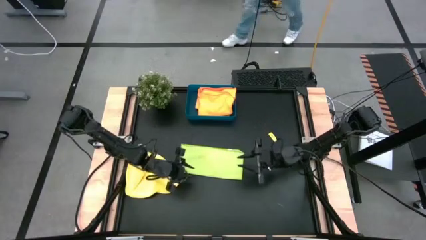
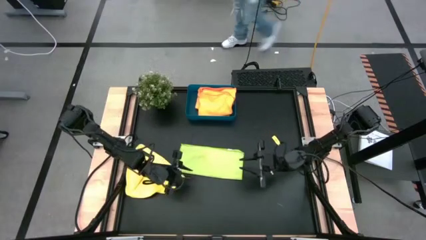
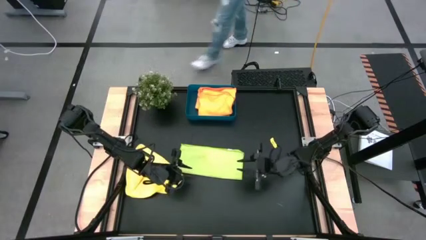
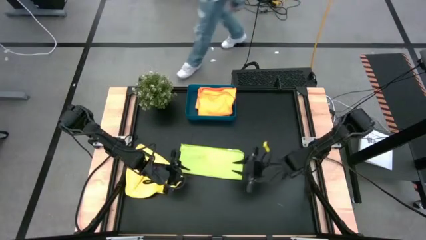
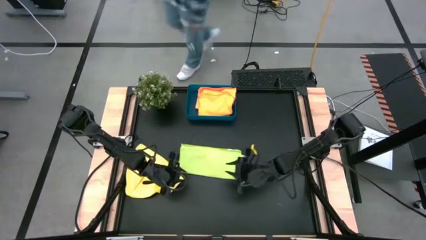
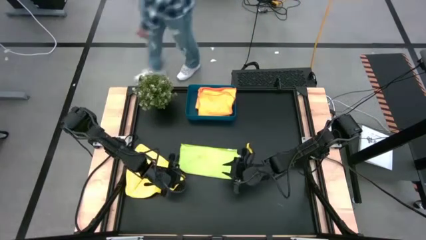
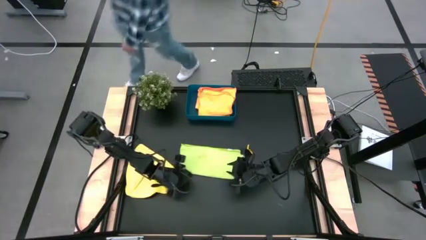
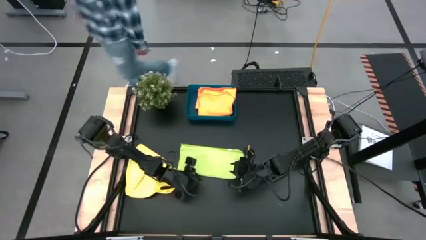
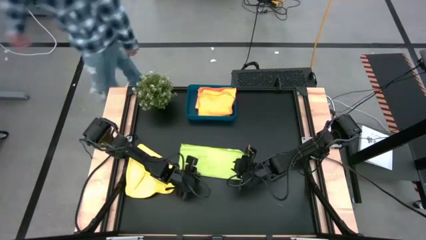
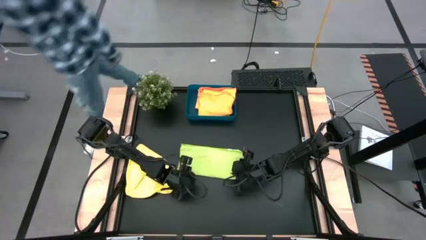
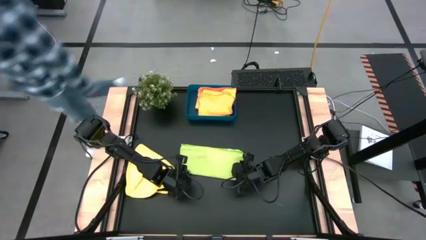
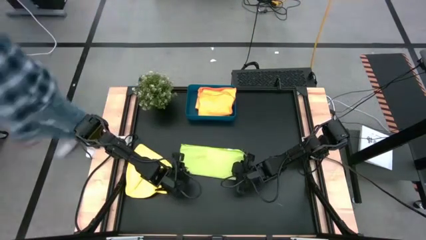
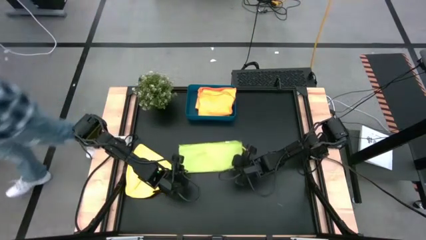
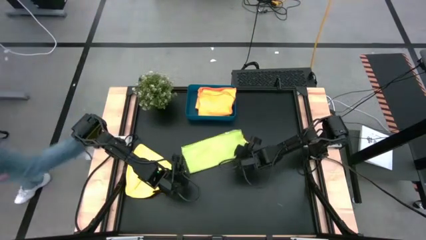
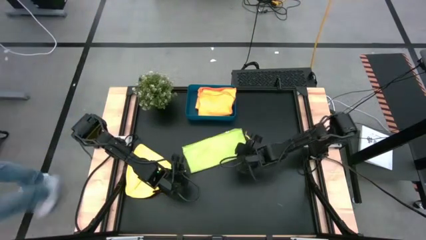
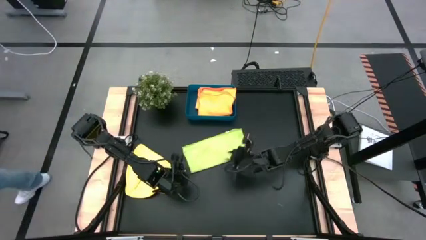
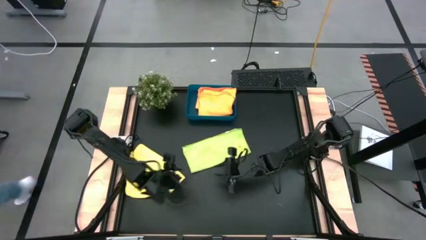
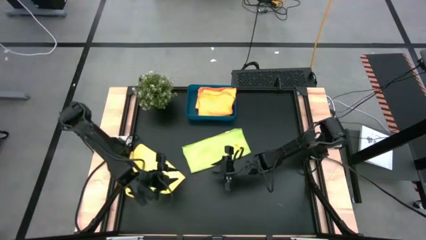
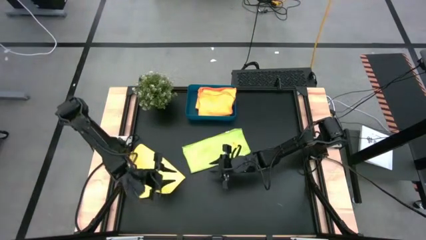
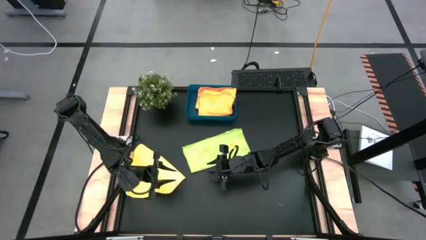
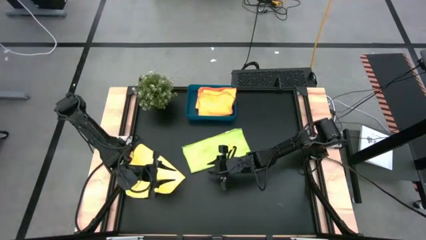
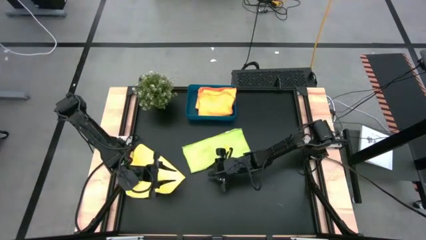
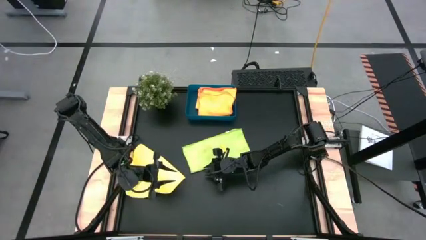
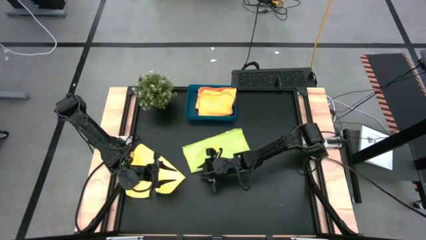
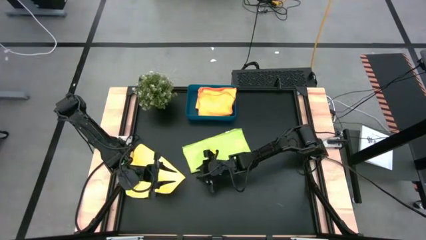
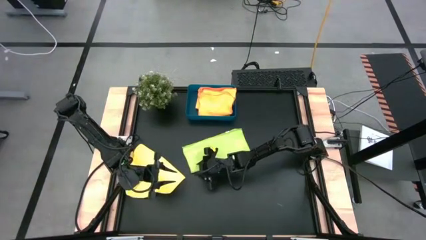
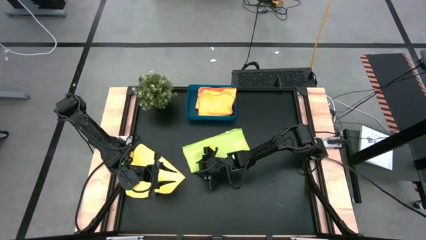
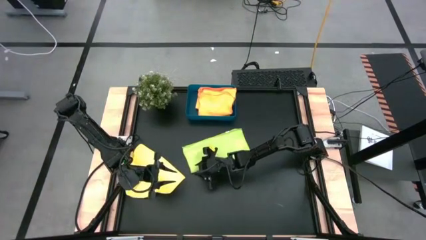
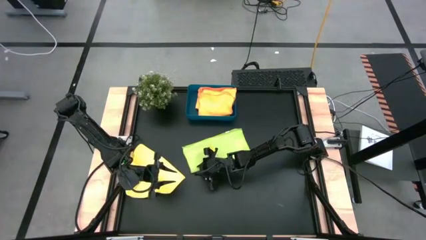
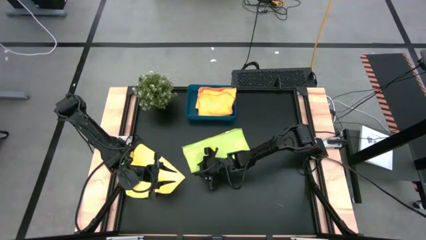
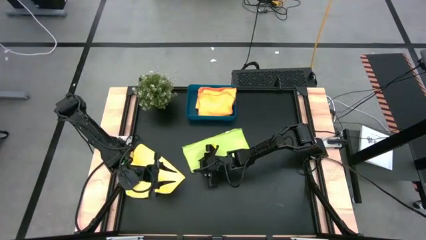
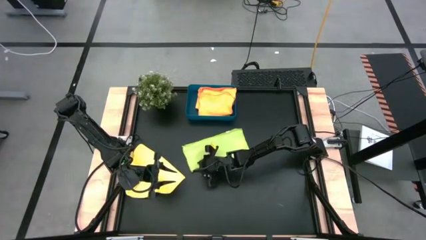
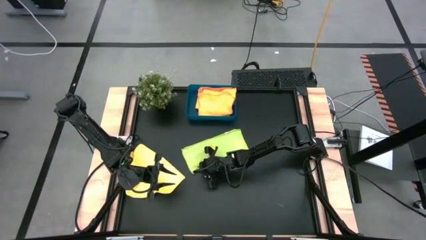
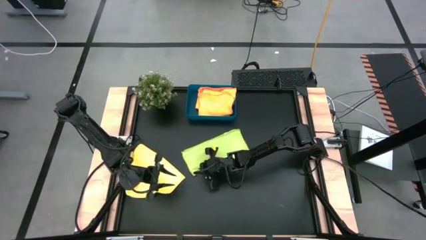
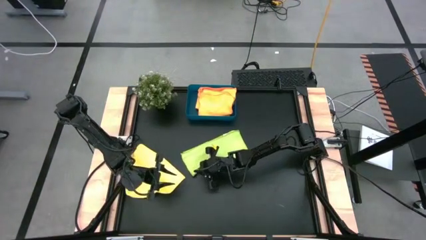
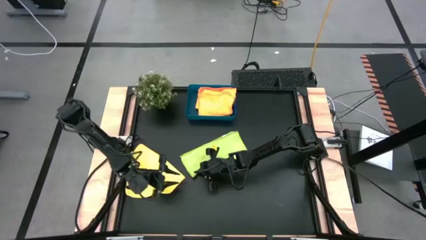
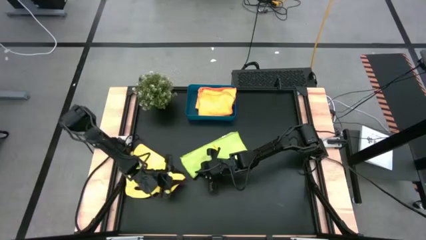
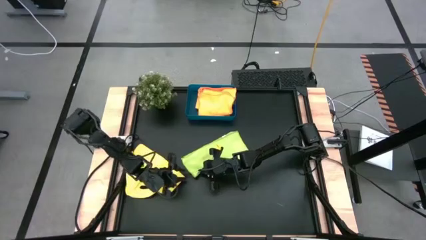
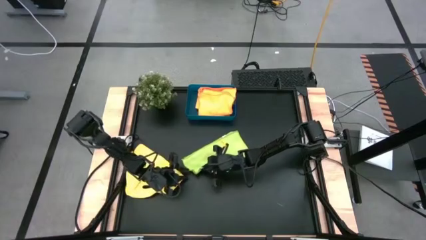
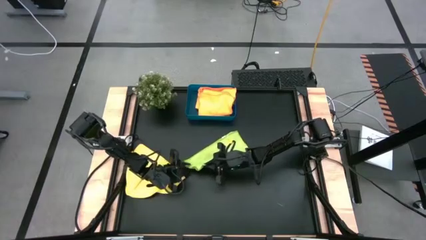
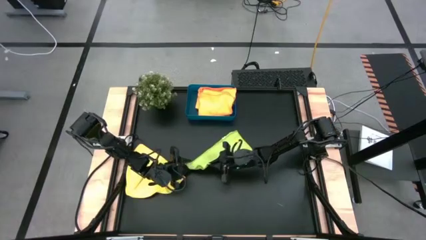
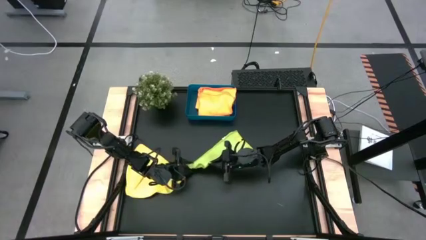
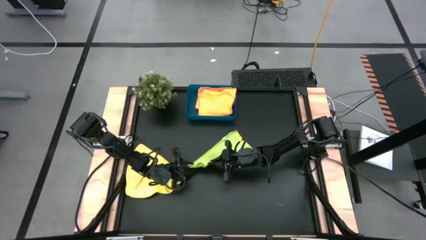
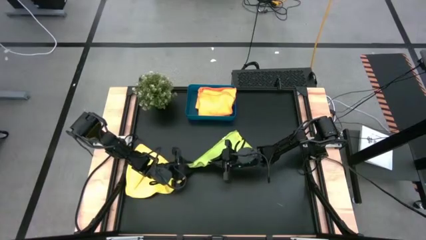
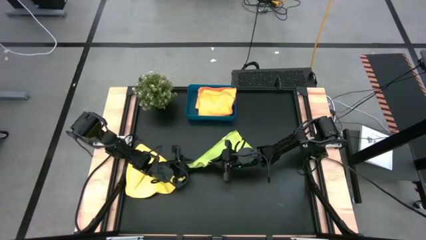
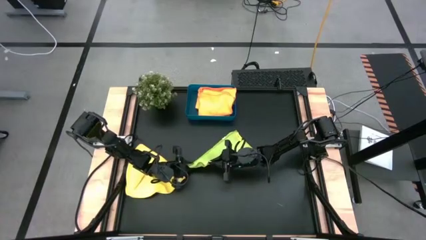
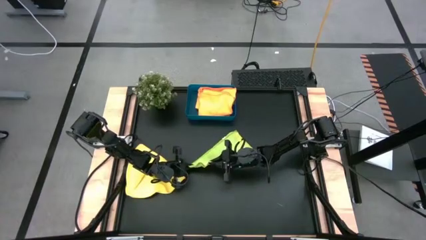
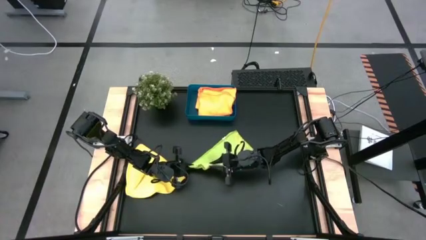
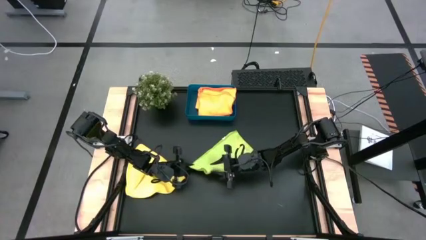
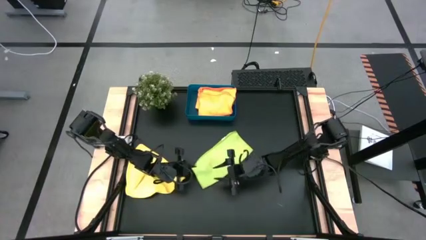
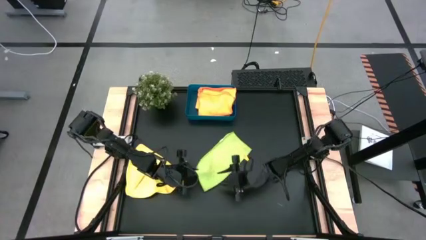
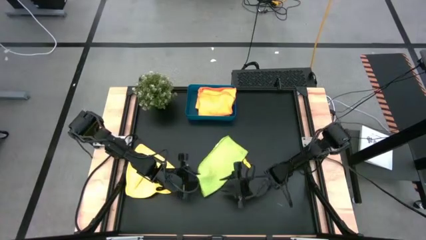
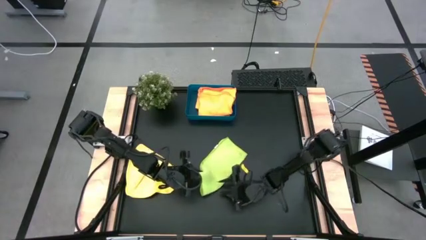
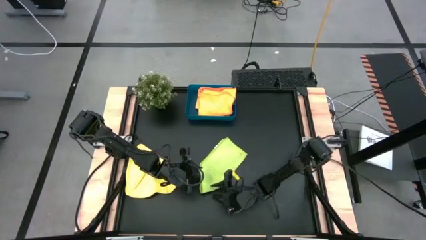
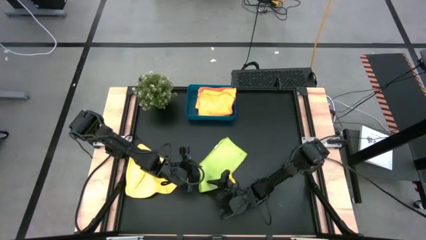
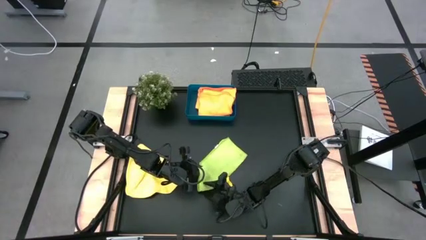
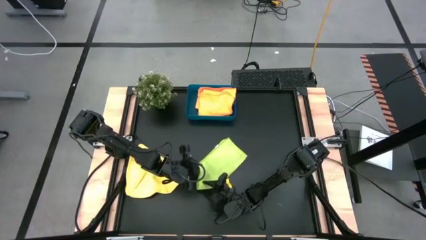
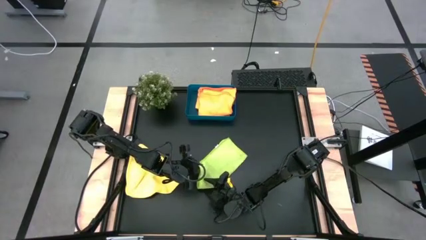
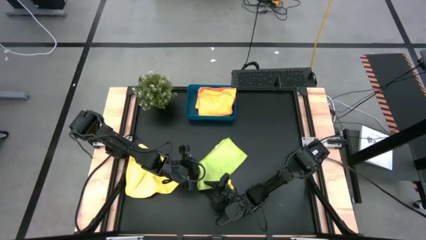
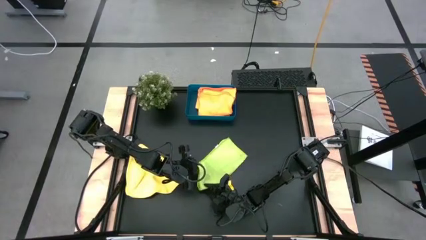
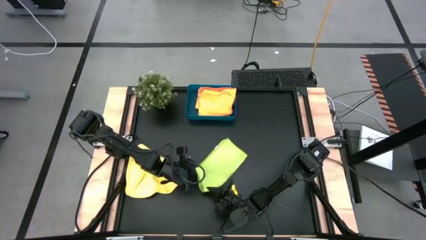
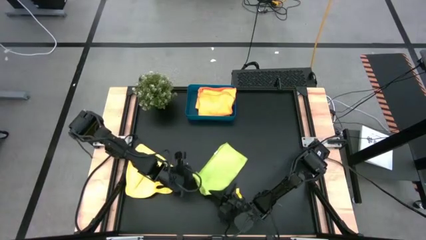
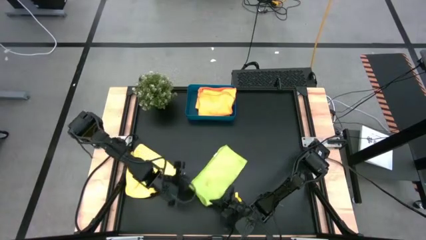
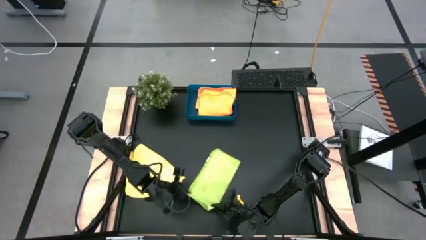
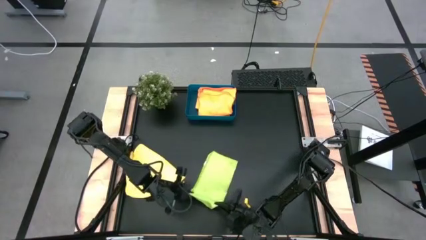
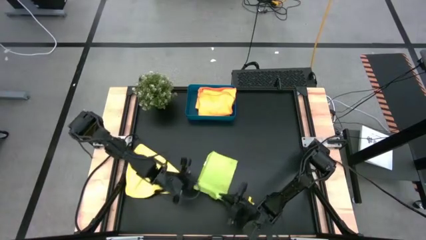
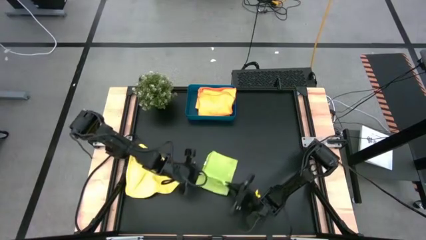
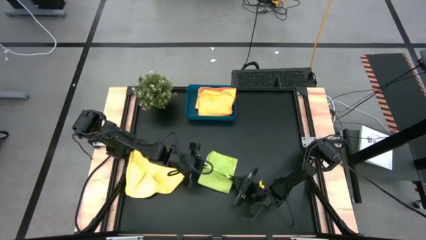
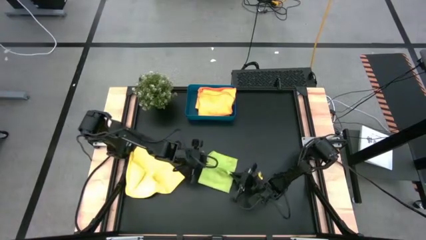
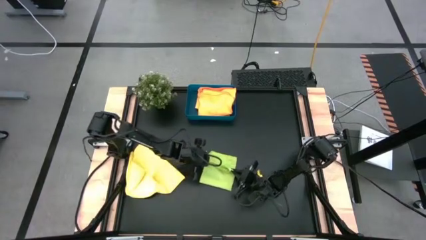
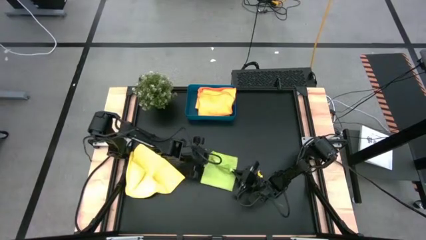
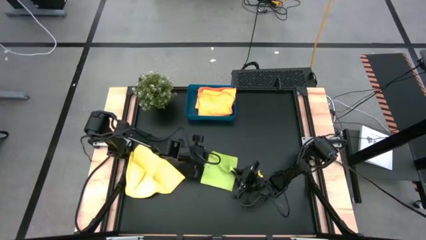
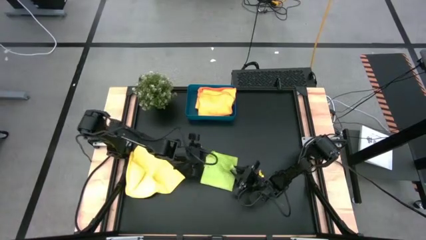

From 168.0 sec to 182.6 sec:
Task: Fold microfiber towels
Fold the green microfiber towel

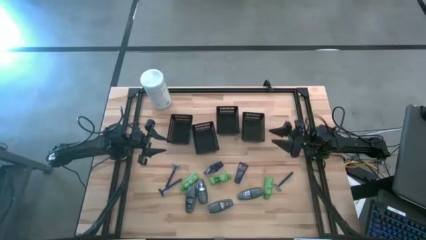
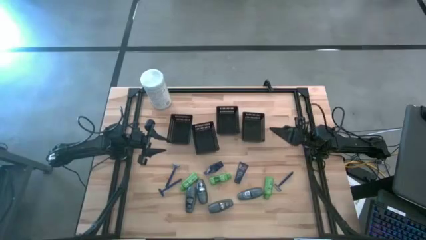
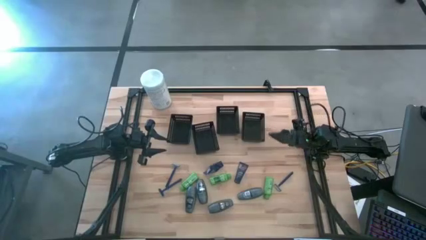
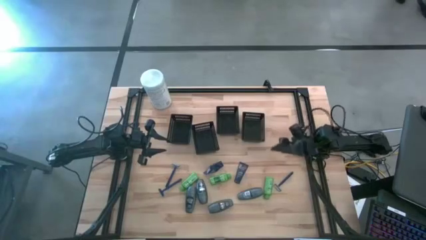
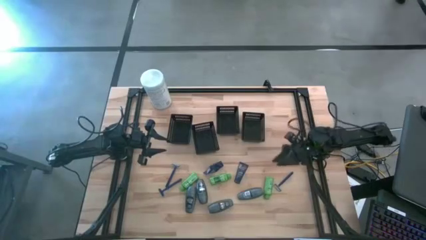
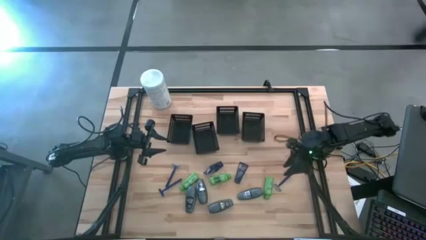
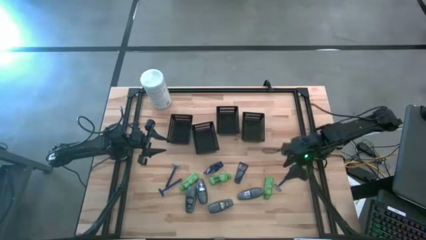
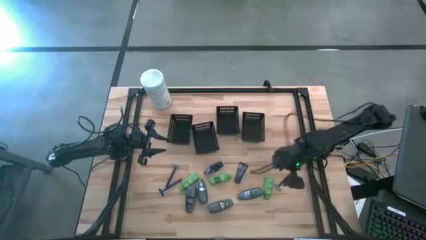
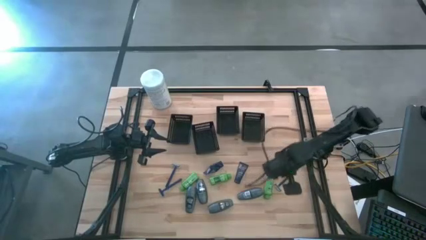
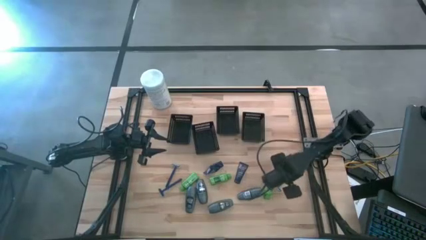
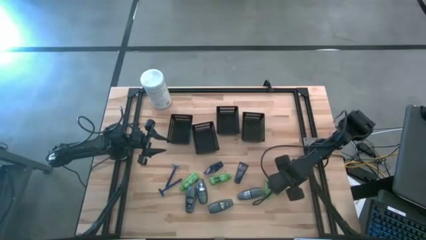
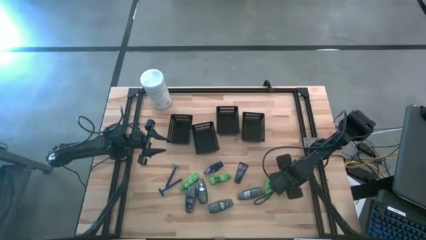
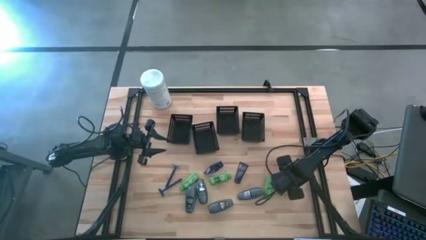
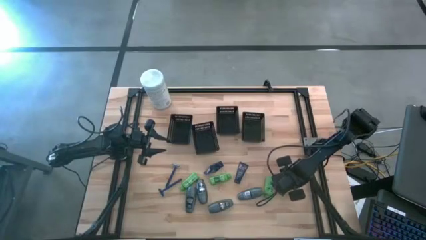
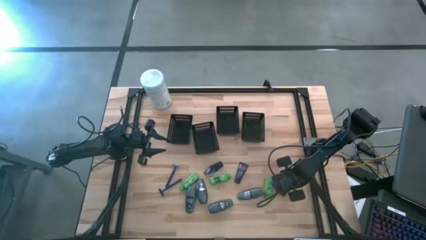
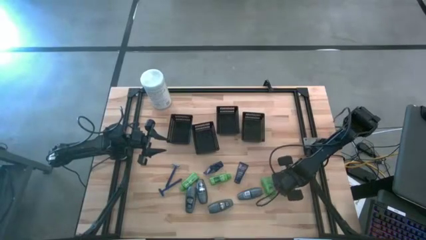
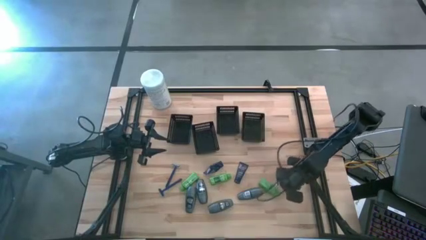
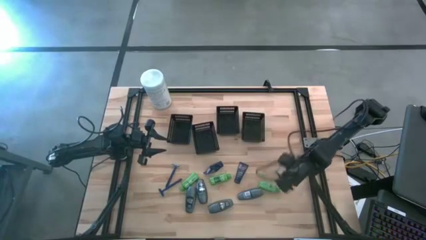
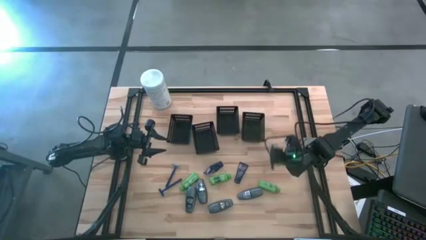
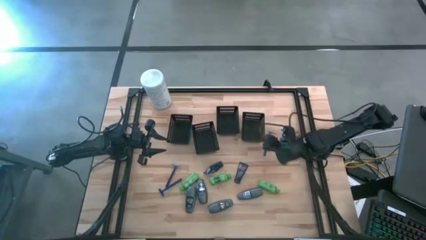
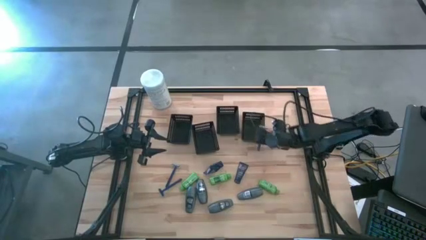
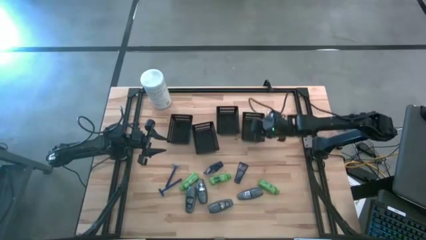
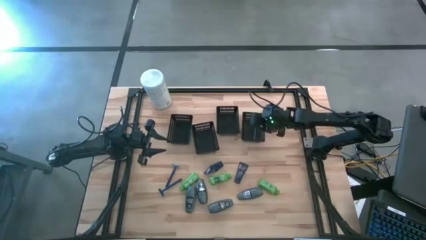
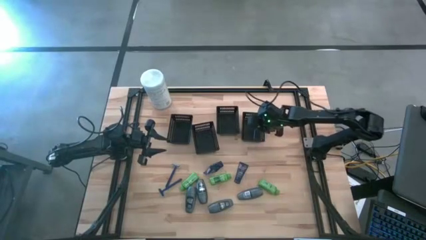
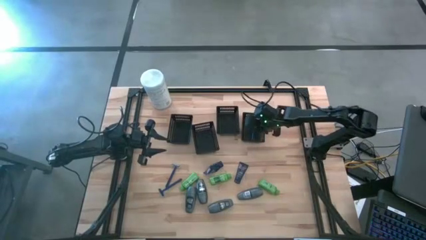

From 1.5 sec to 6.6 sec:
Task: Pick & Place Travel size toiletries
Put the right razor into the right bin
